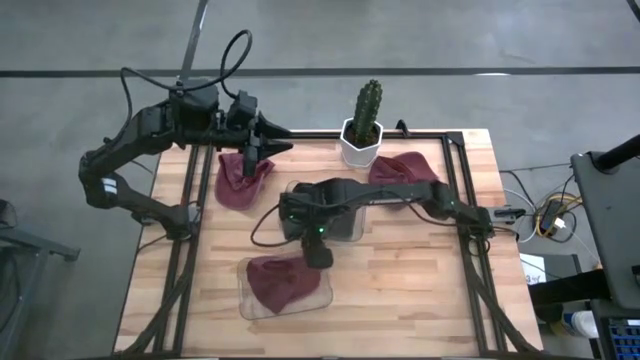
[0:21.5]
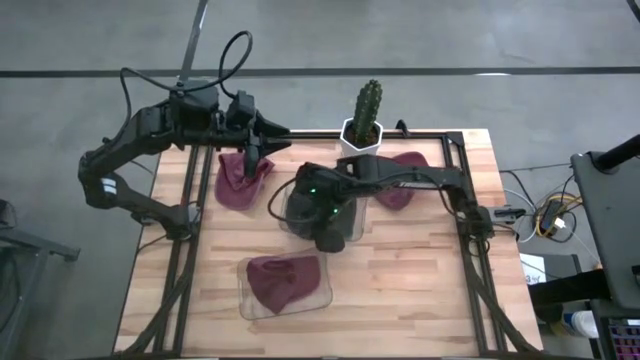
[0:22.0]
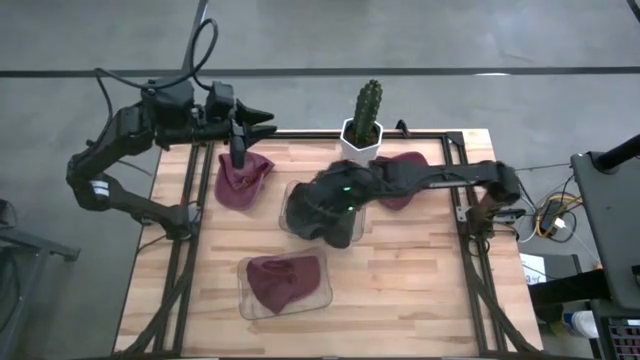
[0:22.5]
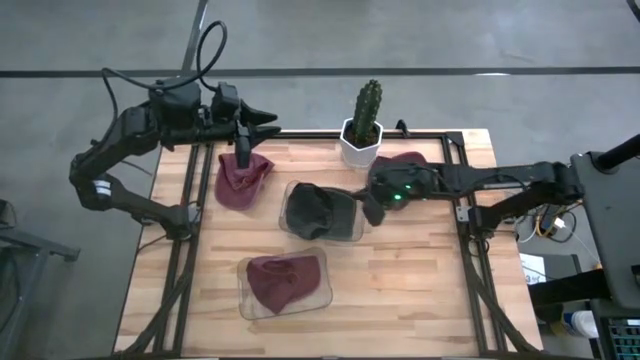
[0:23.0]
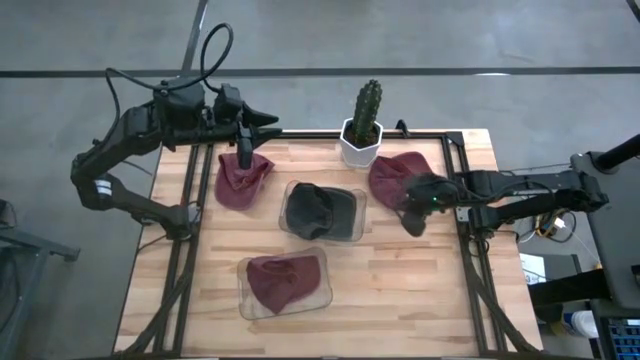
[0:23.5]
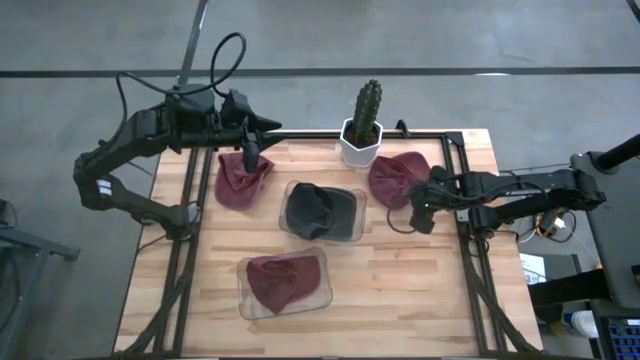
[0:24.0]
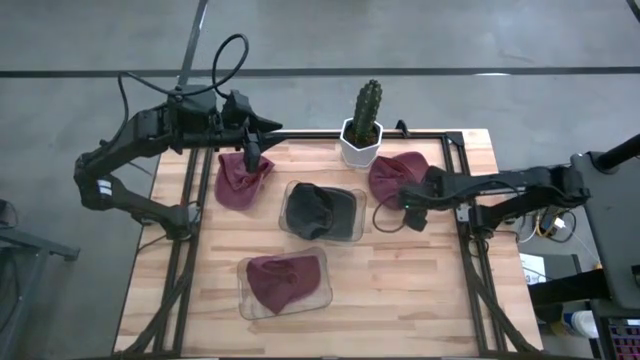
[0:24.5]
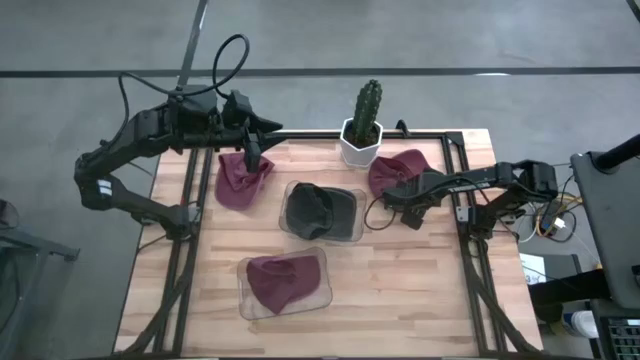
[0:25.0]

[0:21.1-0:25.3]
Task: Pick & Place hat
Put the red cap into the bottom transparent bin

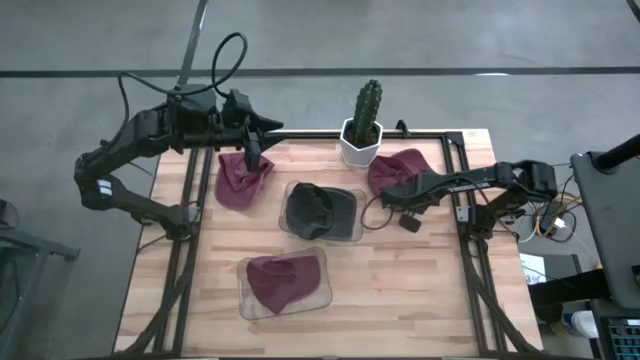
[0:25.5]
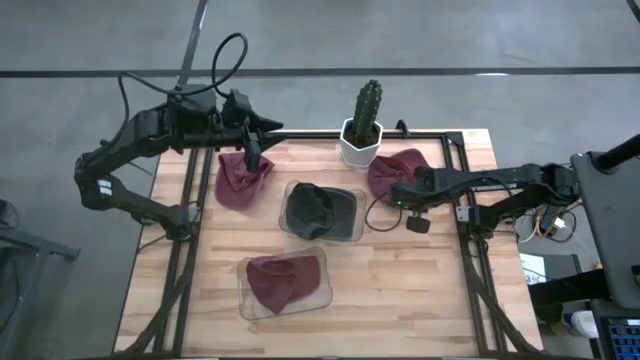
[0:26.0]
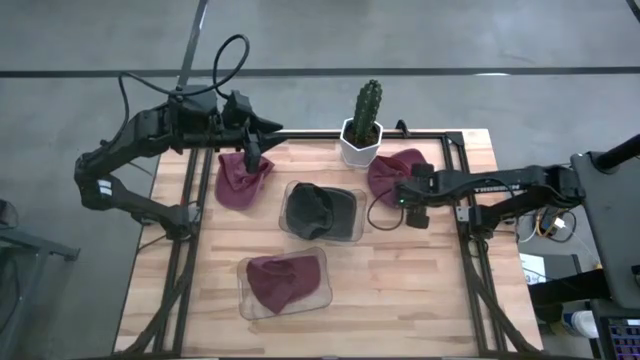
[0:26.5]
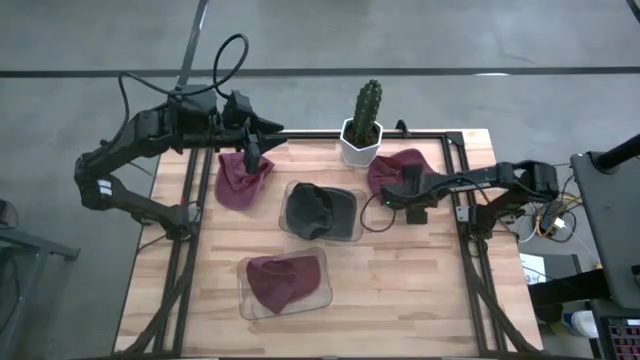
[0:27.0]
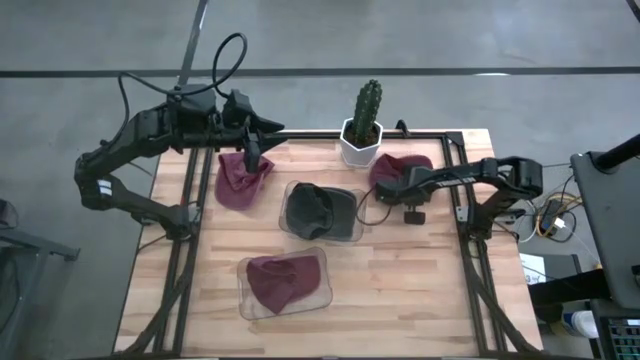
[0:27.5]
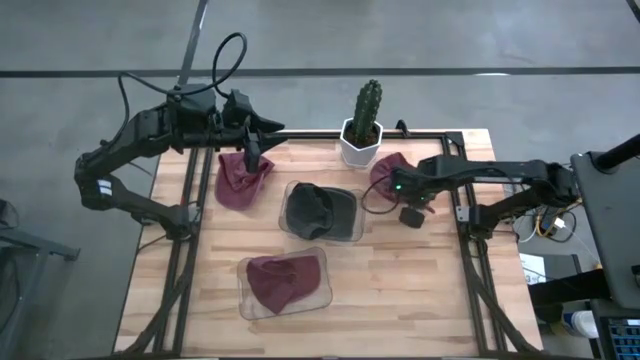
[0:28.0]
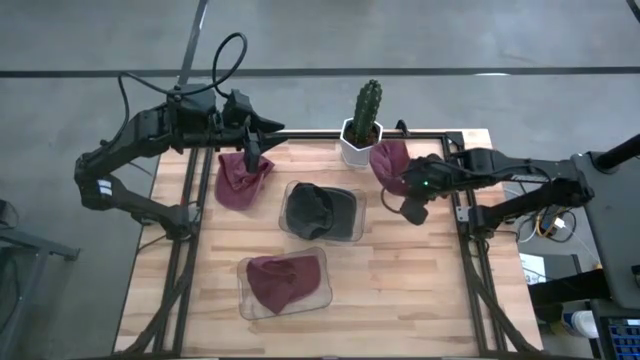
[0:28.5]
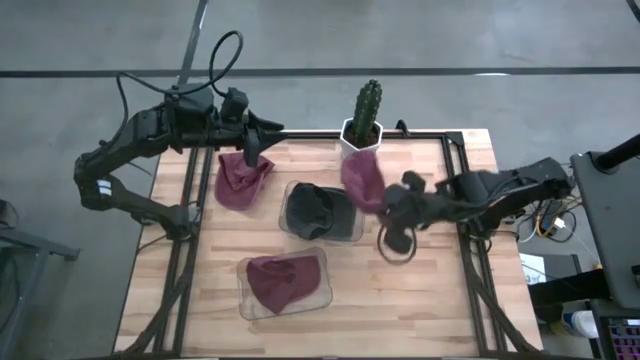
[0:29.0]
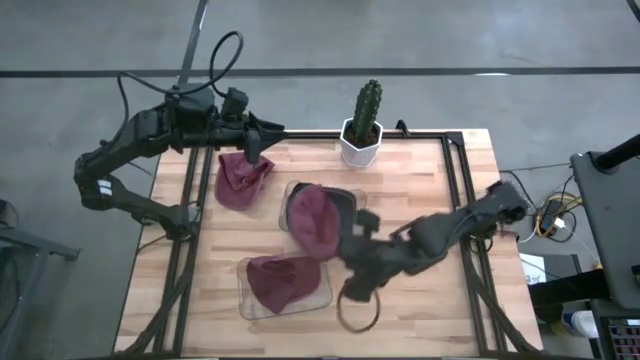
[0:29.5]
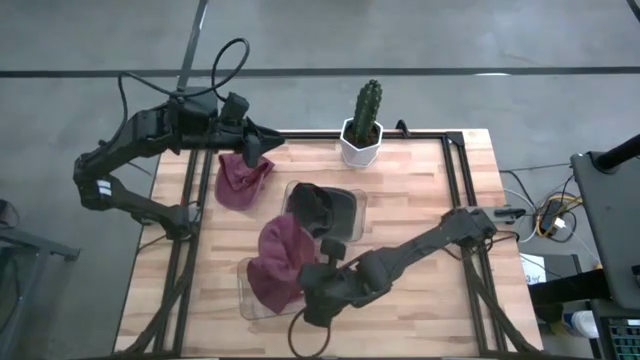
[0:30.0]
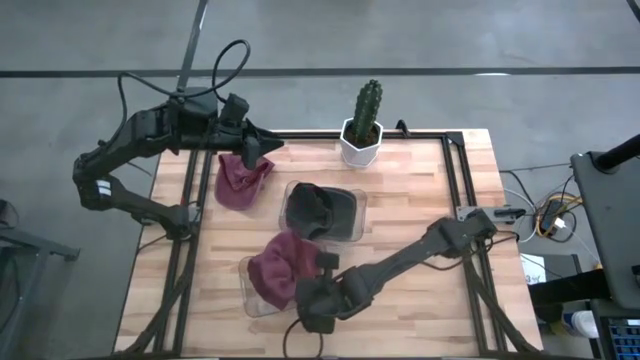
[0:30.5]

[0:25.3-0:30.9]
Put the red cap into the bottom transparent bin

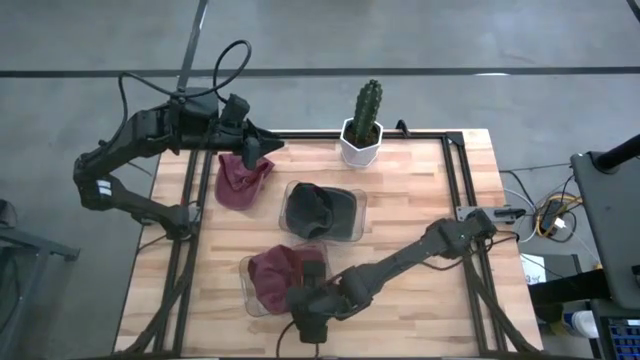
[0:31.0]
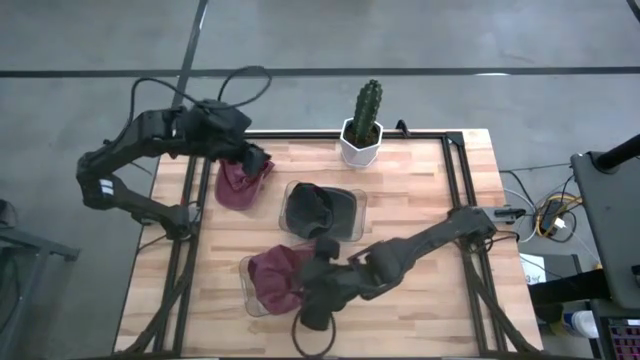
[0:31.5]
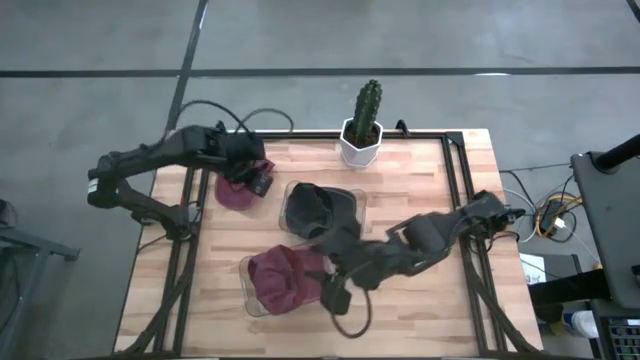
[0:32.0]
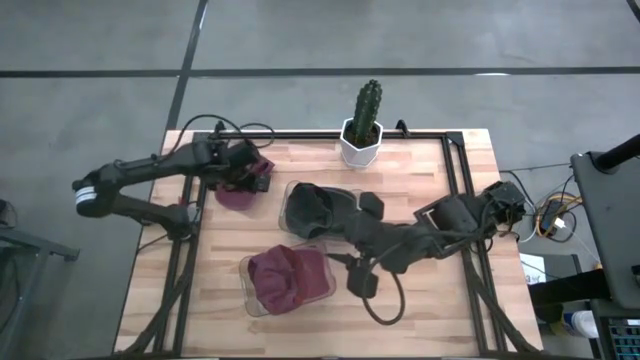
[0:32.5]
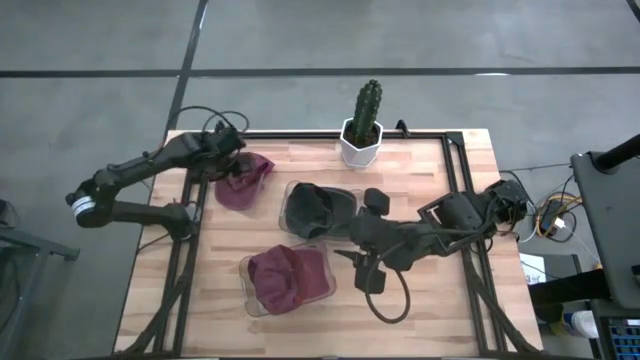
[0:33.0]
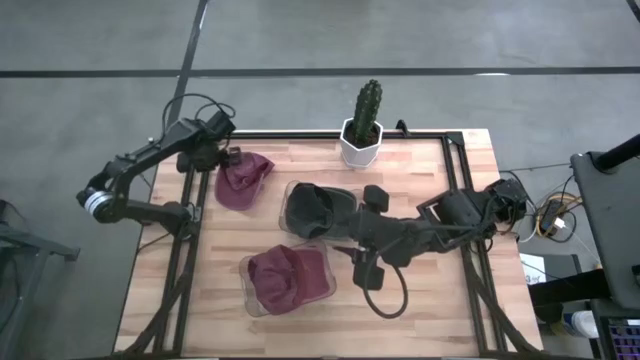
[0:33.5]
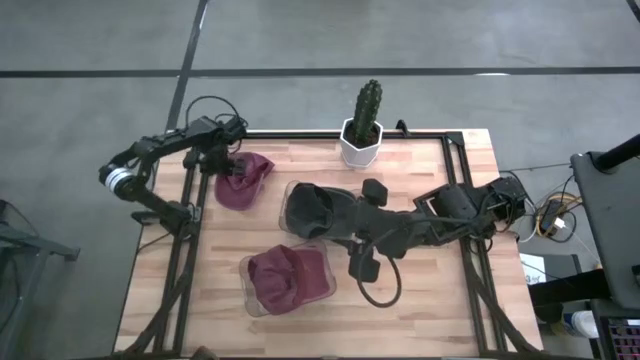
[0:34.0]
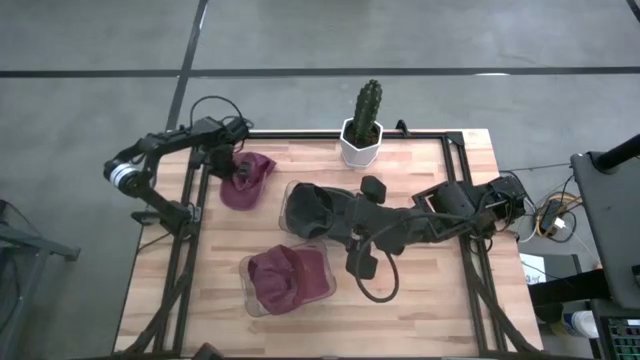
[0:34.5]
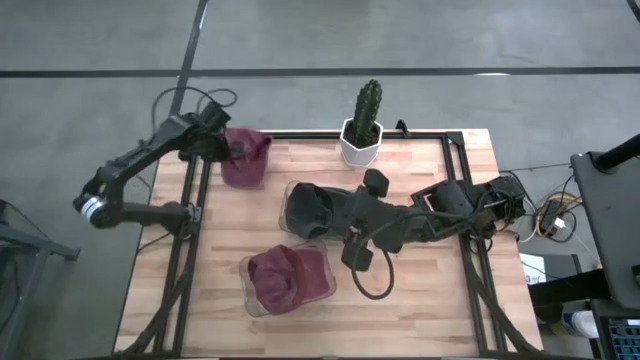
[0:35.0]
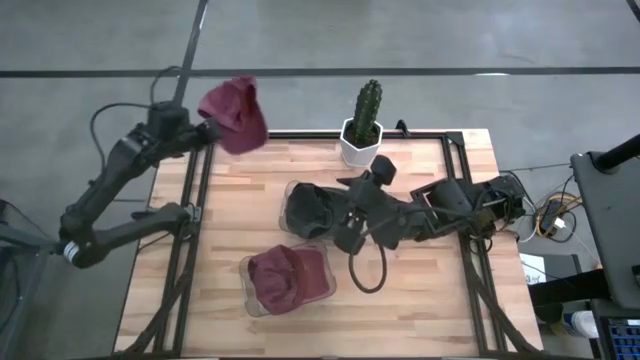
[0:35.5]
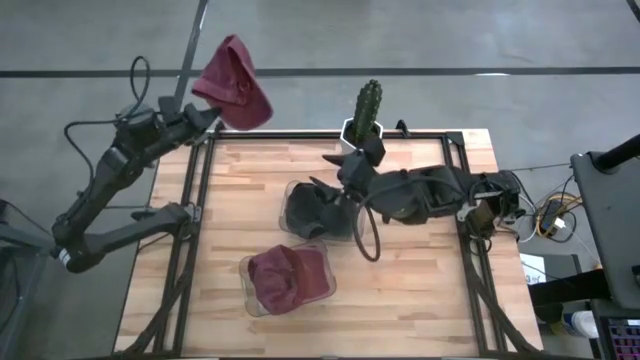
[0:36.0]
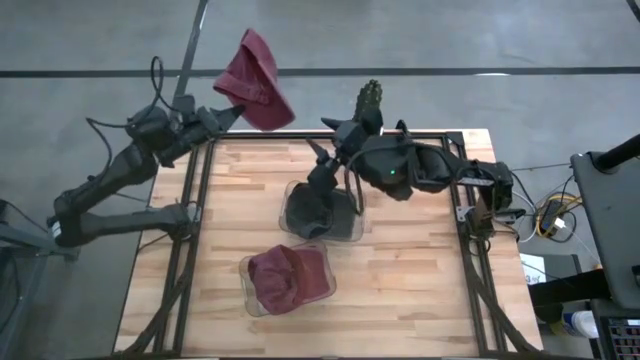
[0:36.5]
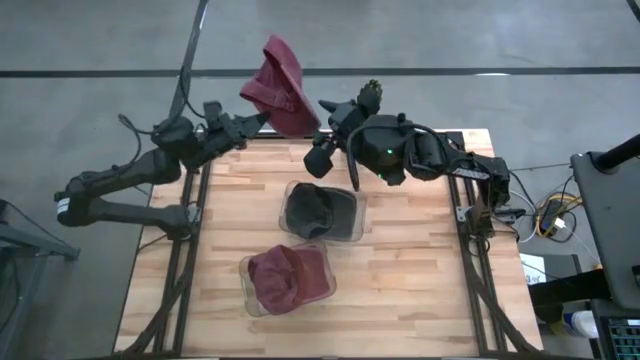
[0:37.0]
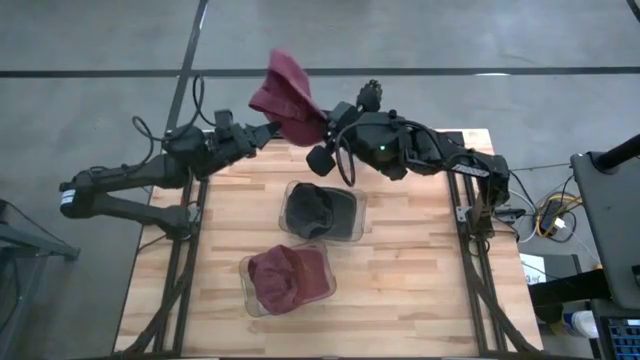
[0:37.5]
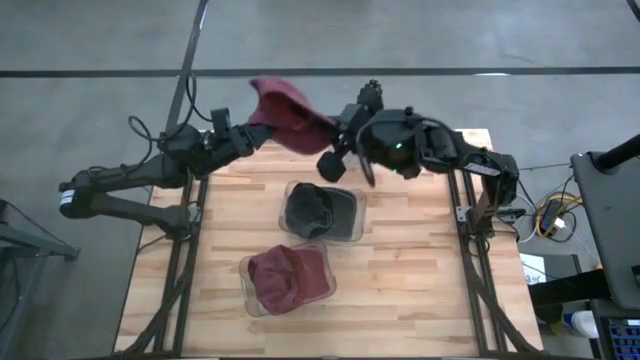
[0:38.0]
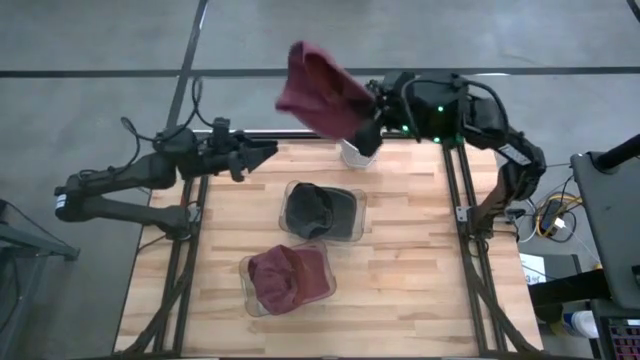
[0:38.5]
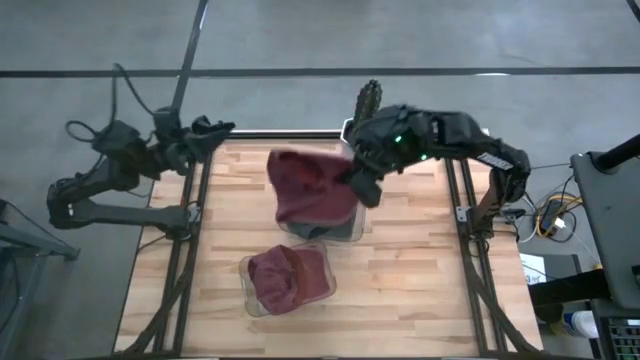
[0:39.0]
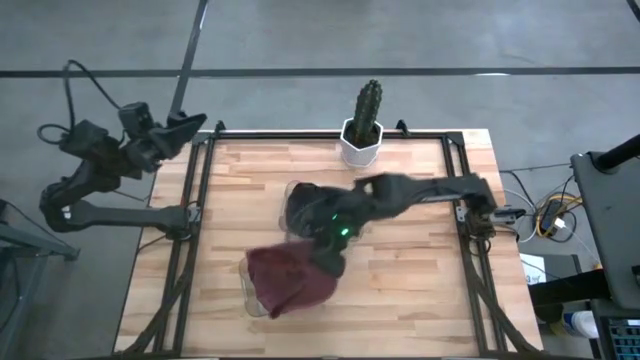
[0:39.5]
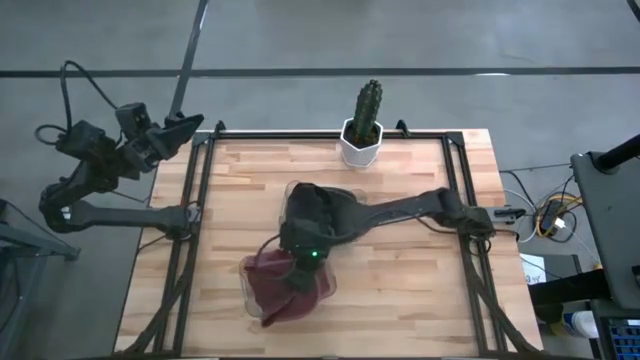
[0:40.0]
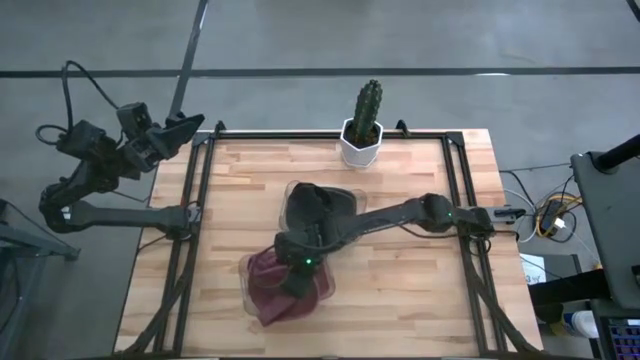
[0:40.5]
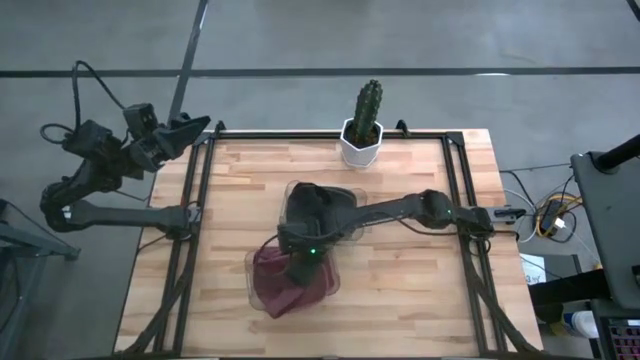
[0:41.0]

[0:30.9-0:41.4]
Put the red cap into the bottom transparent bin

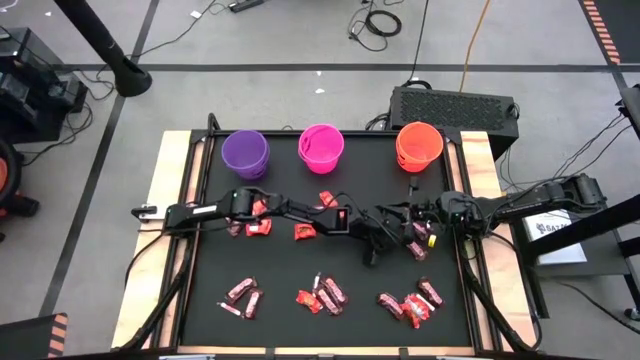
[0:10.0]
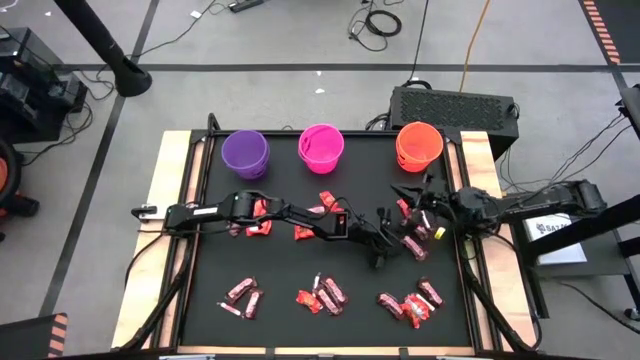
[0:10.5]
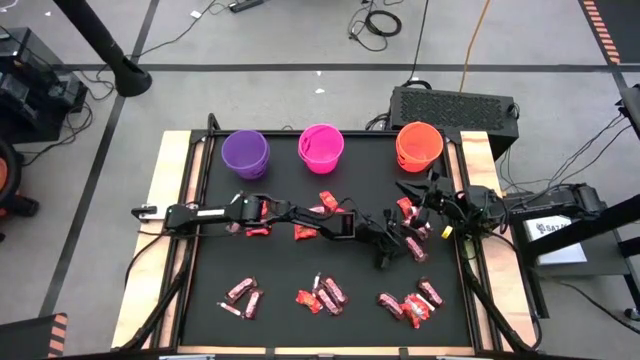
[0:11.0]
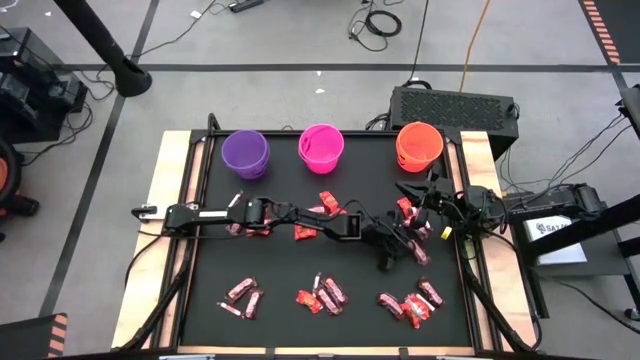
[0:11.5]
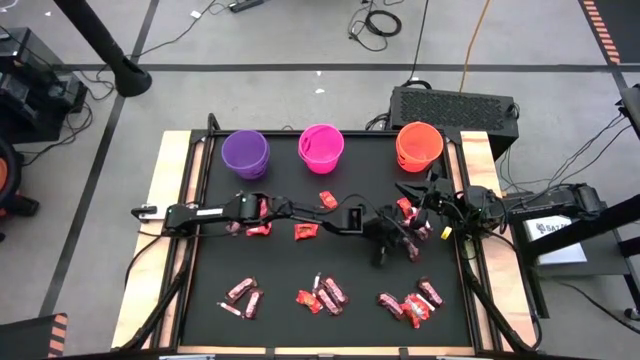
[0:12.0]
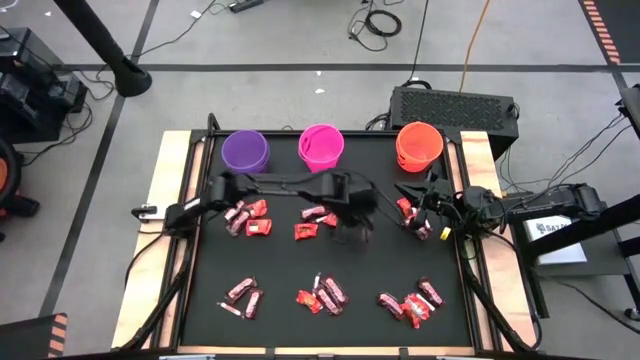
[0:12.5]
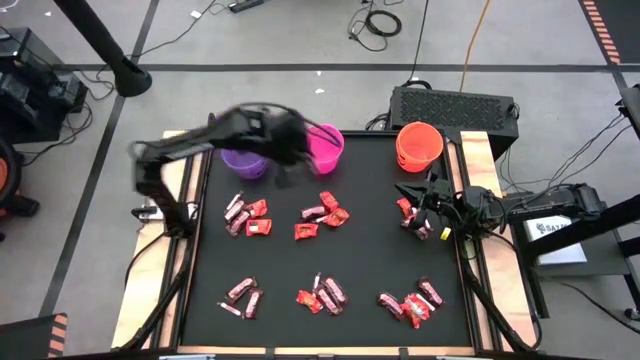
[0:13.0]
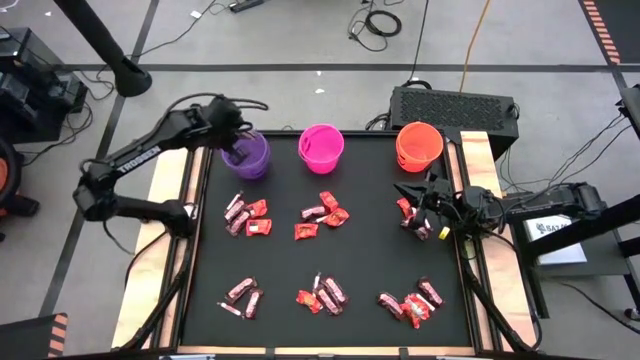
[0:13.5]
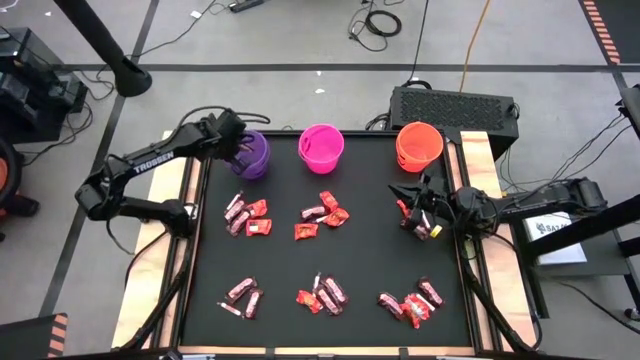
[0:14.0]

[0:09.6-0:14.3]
Task: Sort candy by brand, put in halloween buckets
Put the brown chocolate bar into the purple bucket
